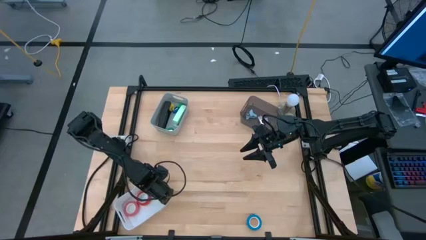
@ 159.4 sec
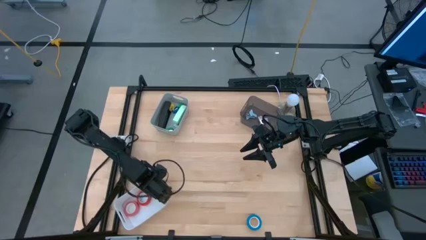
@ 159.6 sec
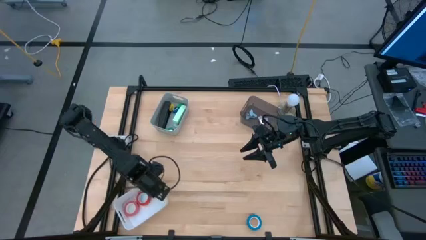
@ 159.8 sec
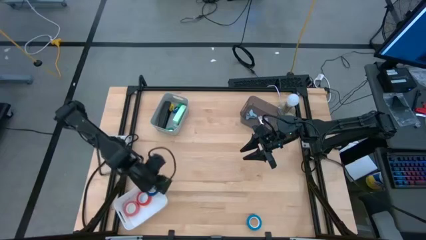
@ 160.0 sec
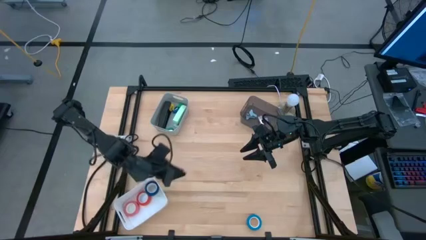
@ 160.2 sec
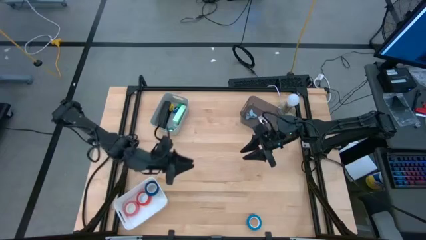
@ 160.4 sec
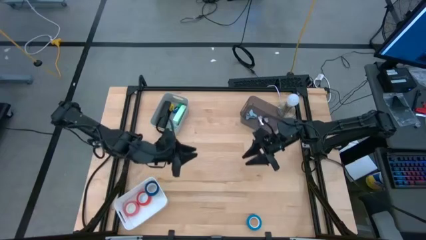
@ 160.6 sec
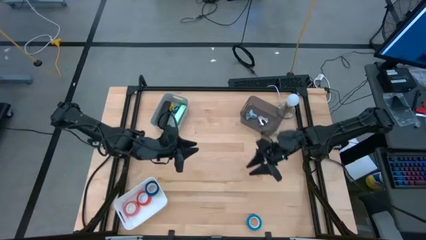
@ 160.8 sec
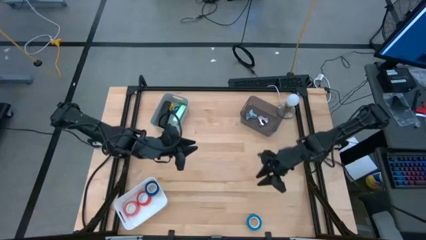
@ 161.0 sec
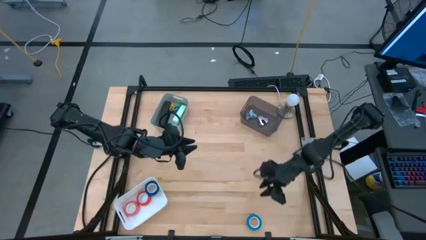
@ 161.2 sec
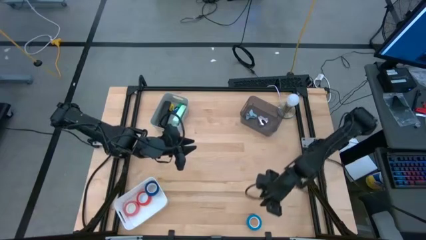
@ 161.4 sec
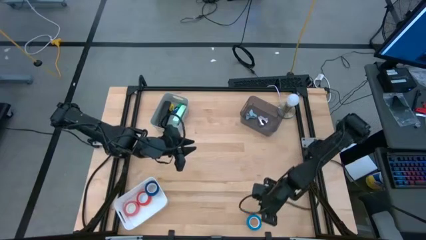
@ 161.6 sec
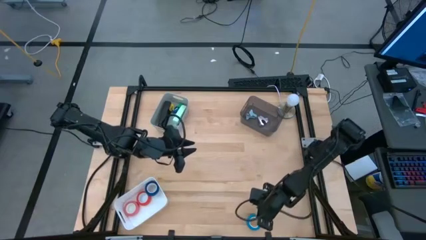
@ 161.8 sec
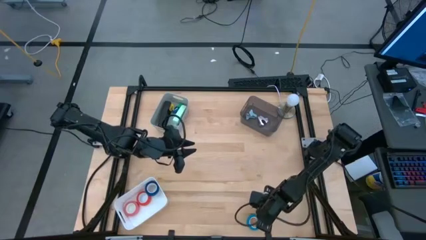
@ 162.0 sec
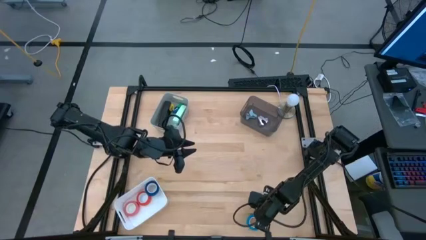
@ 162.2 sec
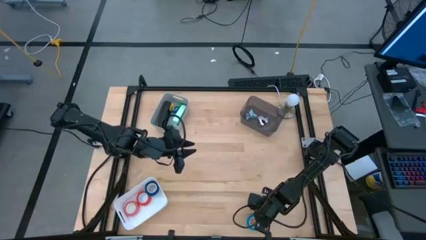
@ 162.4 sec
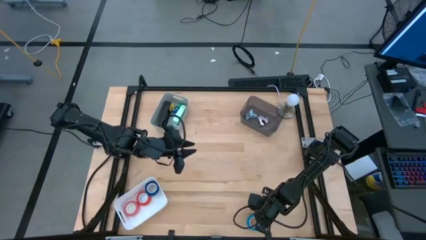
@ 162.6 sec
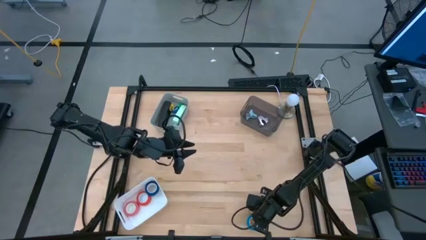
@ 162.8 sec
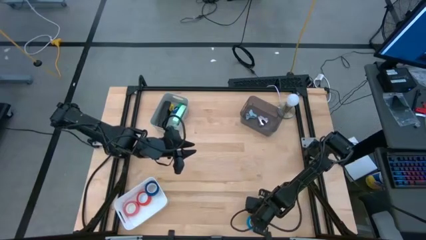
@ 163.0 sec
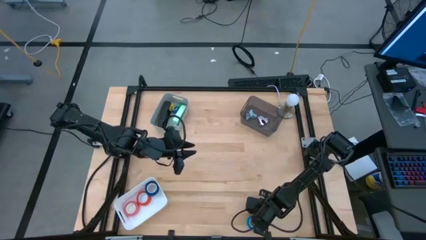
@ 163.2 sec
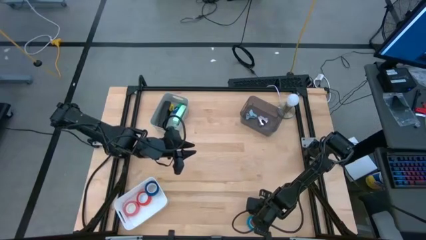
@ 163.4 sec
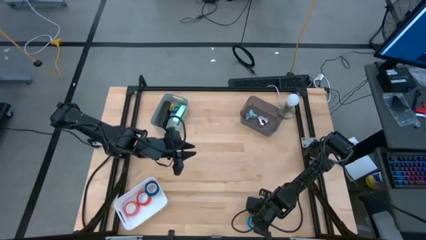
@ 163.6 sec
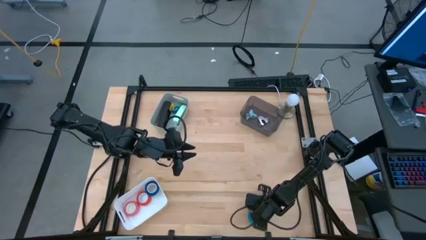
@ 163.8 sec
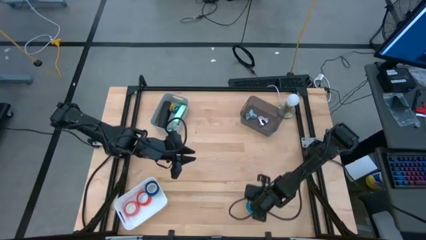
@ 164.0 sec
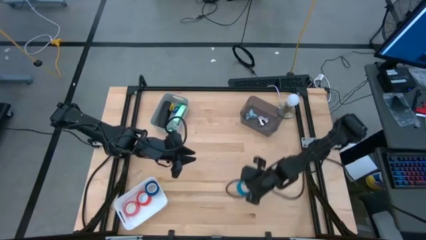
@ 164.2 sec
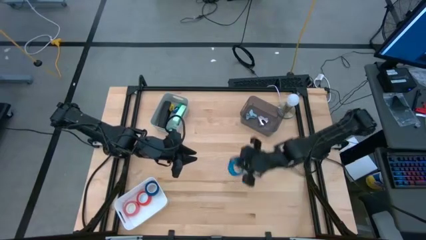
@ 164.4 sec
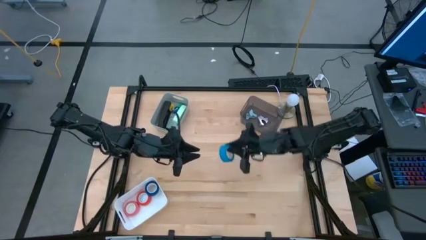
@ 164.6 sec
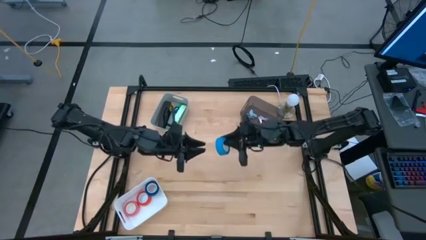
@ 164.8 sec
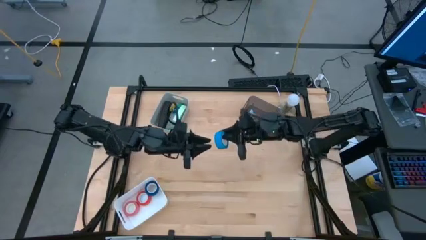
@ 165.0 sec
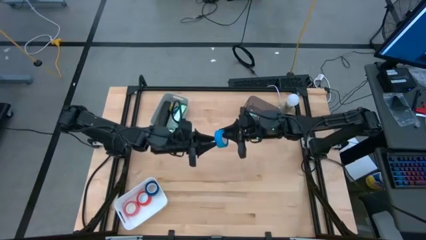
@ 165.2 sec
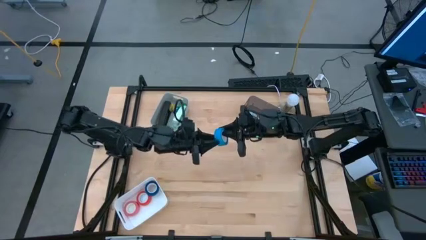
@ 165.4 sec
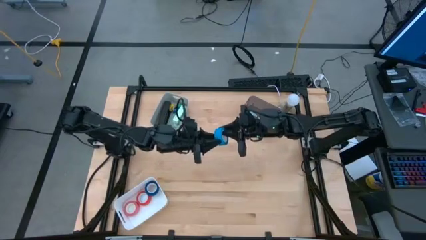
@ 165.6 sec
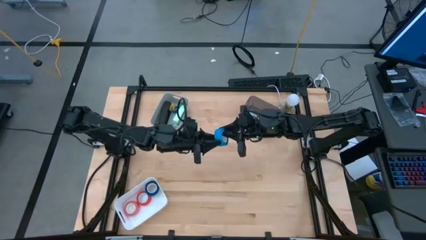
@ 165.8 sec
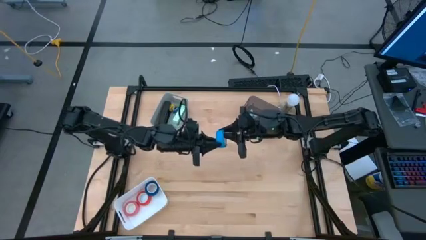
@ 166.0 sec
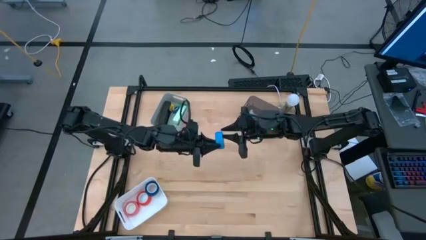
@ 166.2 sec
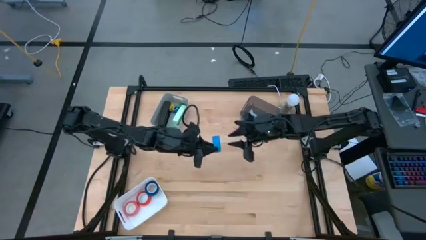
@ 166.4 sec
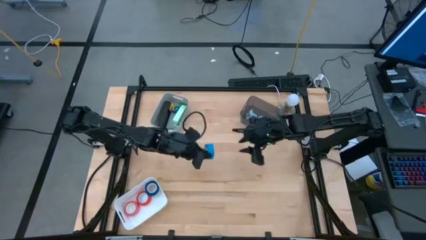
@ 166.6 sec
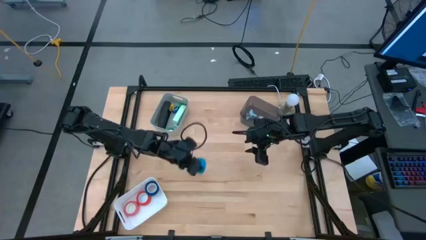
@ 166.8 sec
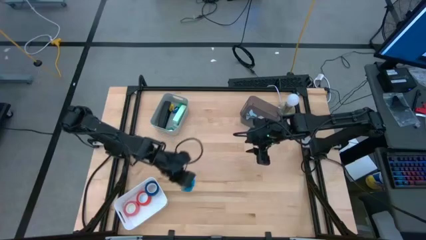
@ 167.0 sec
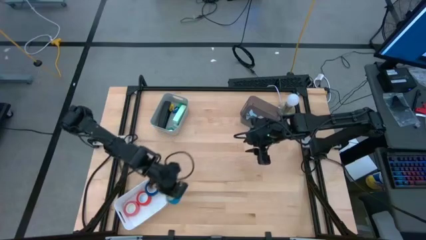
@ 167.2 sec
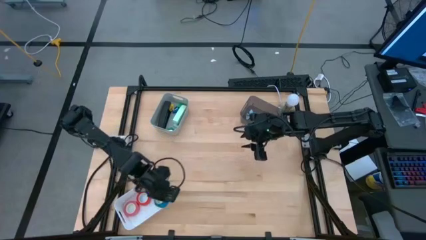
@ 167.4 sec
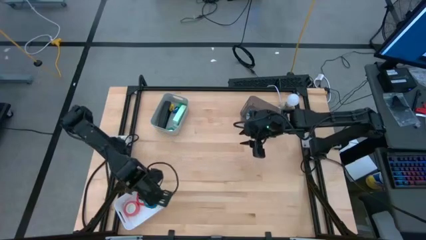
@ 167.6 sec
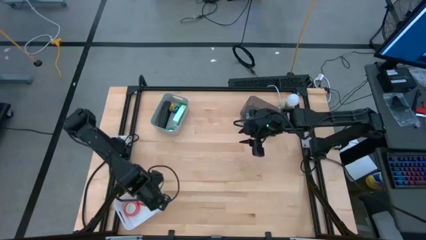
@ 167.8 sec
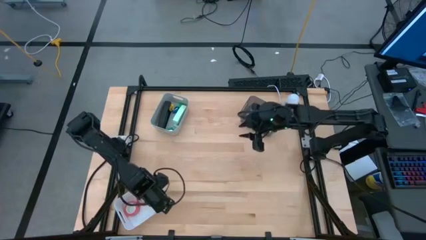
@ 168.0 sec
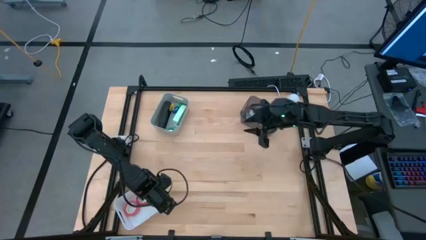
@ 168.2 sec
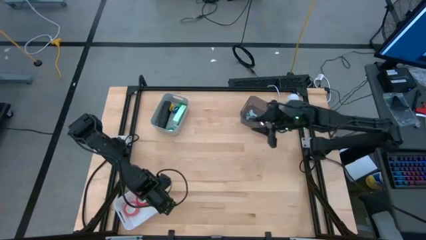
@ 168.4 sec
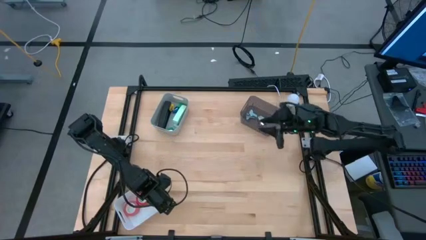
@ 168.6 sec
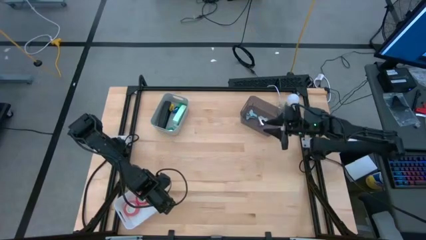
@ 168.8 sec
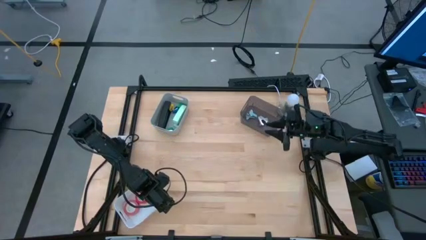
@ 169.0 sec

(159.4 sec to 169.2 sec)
Task: Pick and place Stapler, Stapler remover, tape
Put the blue tape into the white bin

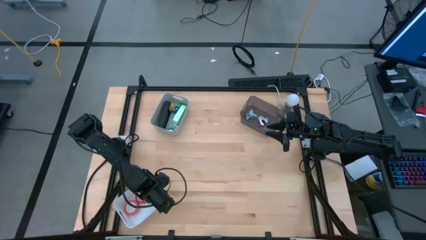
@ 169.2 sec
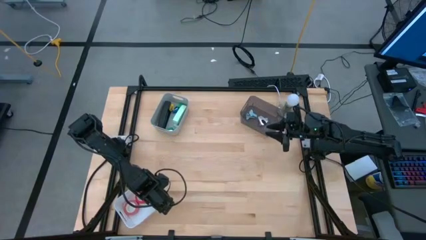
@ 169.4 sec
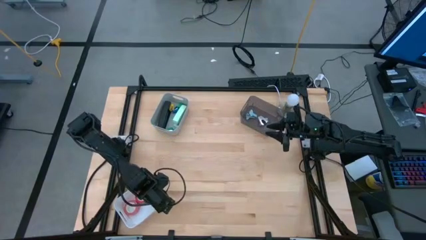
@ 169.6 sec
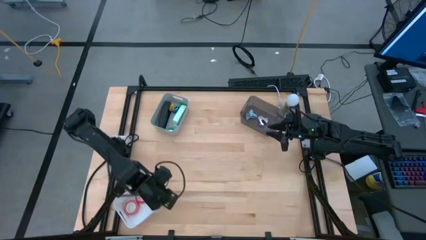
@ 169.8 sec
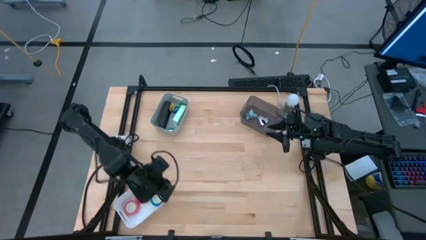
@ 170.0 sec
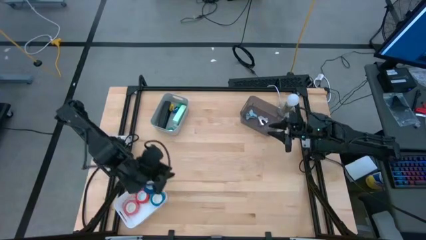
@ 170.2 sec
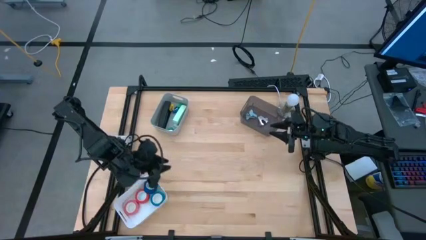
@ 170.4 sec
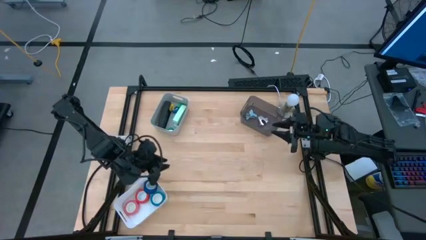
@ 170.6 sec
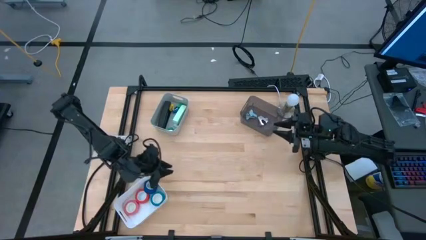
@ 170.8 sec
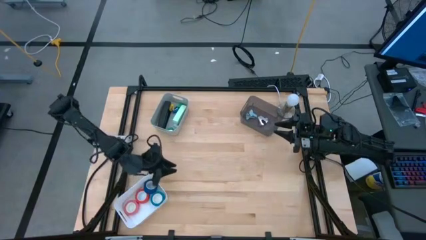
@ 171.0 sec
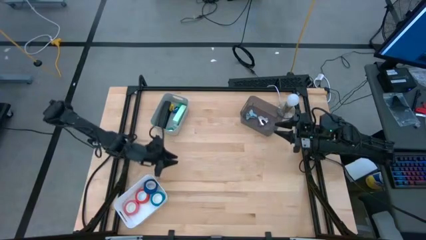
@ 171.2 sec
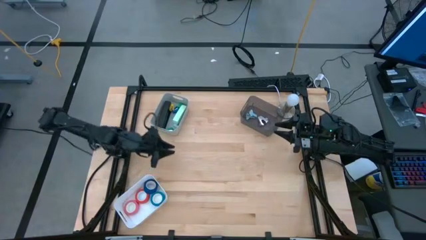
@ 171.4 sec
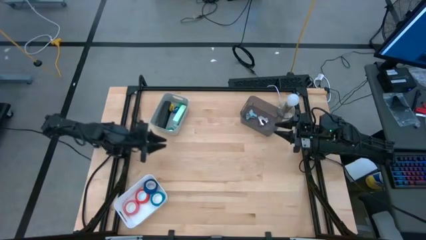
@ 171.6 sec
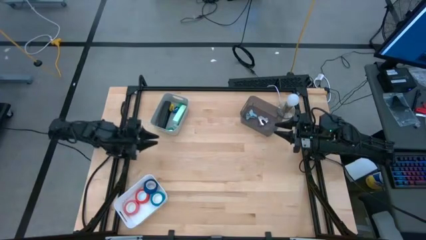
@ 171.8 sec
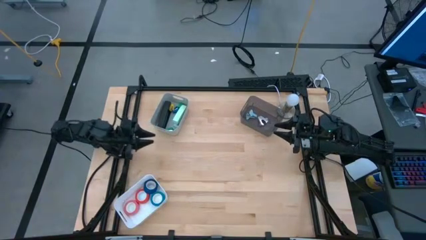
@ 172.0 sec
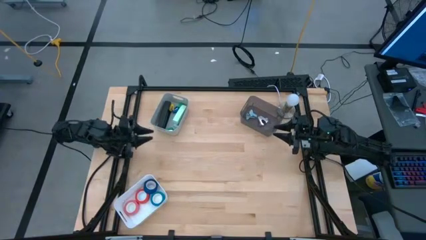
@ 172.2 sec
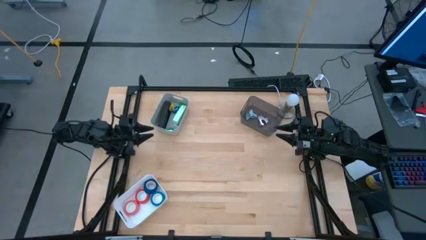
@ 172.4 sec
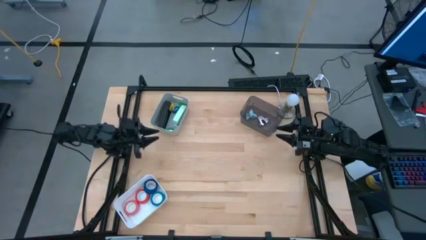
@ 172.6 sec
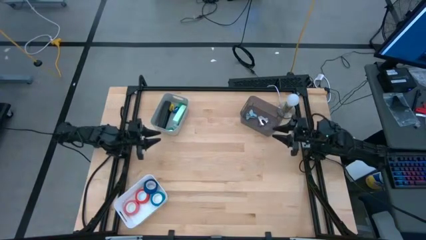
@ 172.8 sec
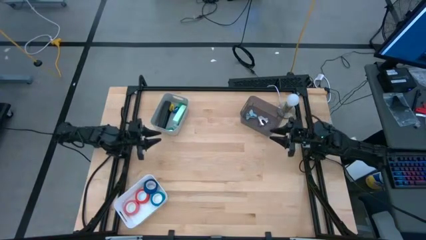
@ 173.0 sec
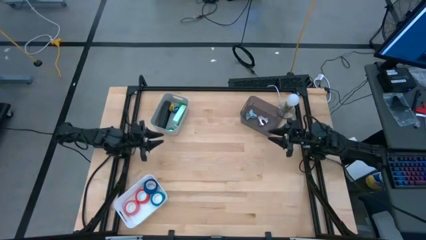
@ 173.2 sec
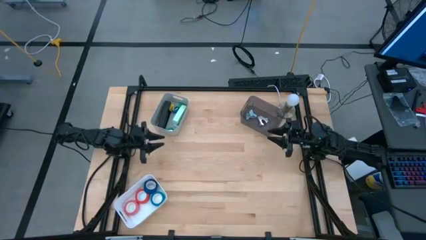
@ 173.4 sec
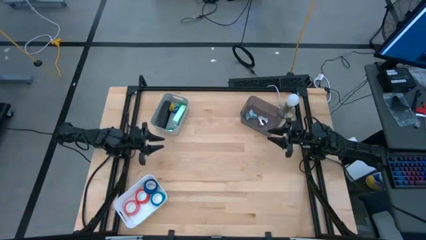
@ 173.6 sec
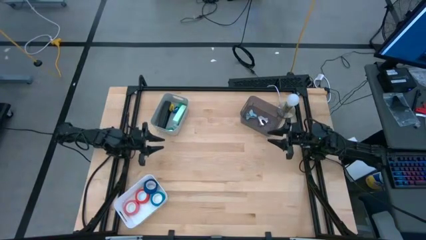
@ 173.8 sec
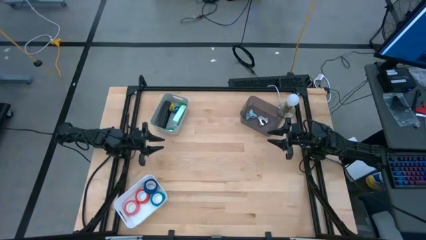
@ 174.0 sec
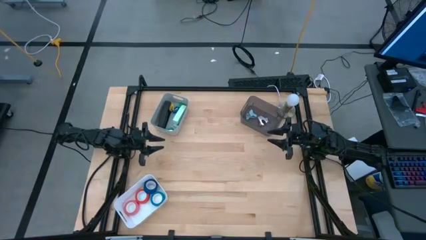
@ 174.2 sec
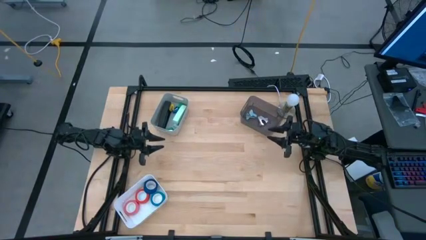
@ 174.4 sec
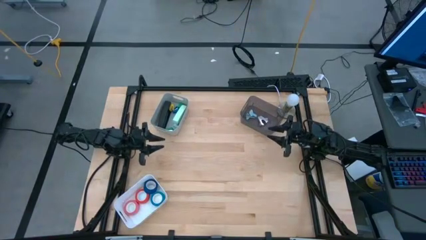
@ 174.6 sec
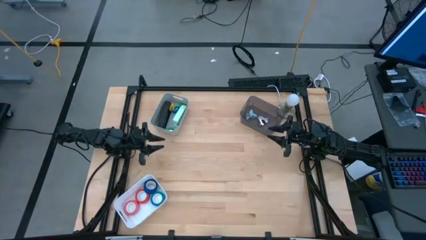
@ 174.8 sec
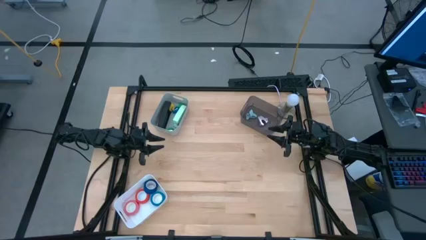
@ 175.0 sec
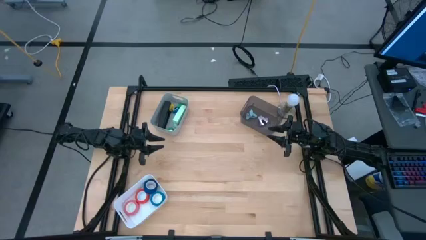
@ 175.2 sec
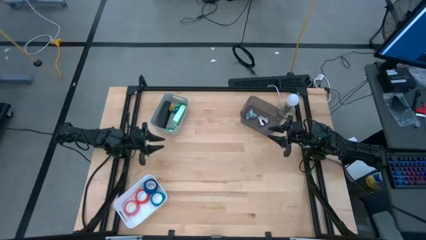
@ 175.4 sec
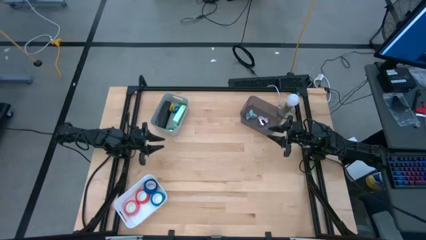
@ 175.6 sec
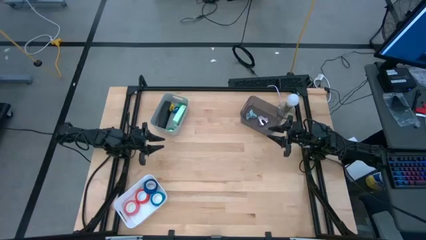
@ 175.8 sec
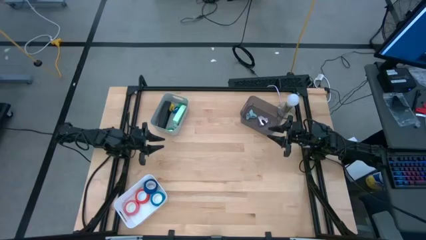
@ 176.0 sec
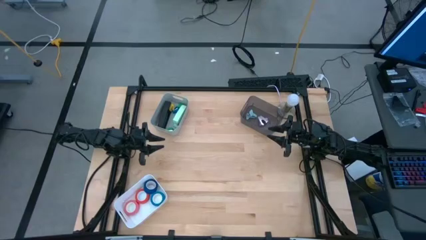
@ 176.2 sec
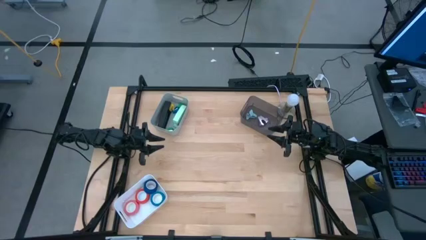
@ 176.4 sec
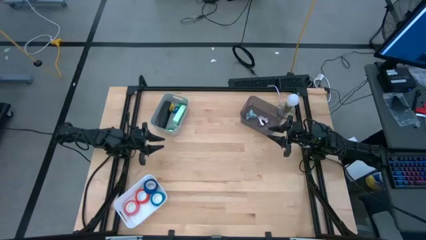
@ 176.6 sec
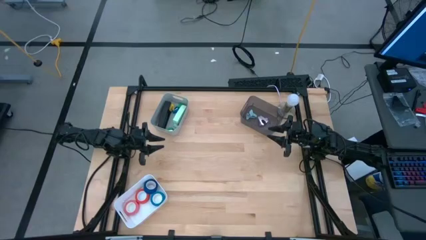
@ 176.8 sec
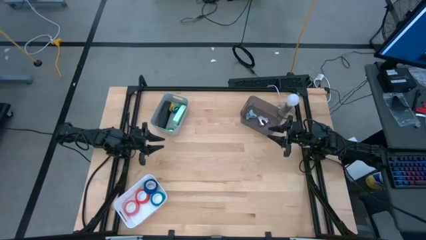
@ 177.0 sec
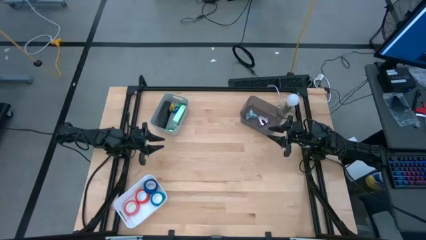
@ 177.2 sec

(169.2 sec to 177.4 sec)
Return to Home Position
